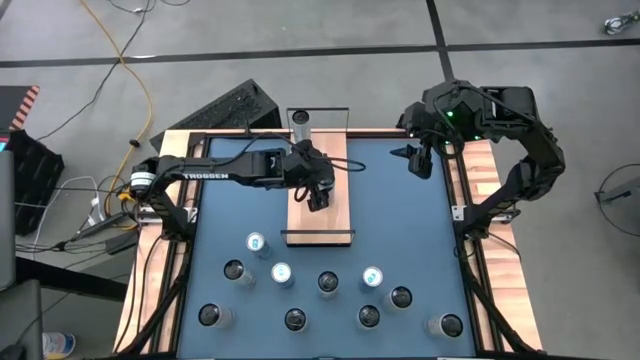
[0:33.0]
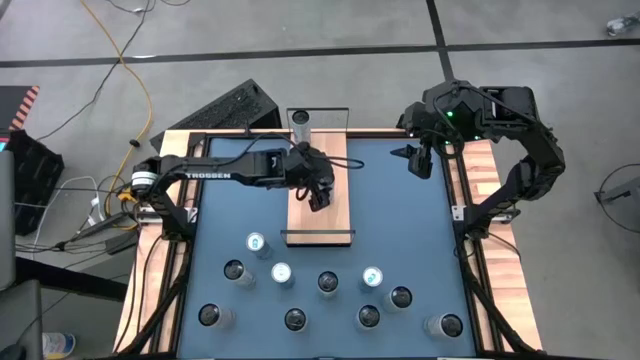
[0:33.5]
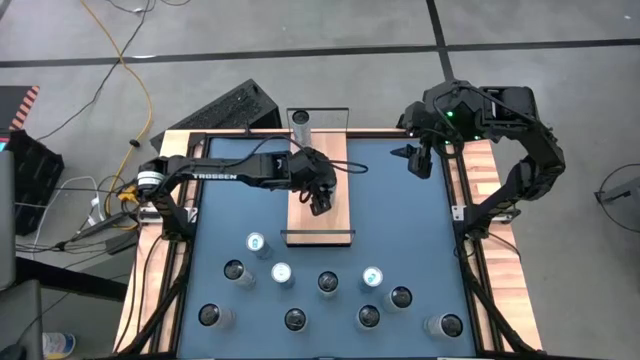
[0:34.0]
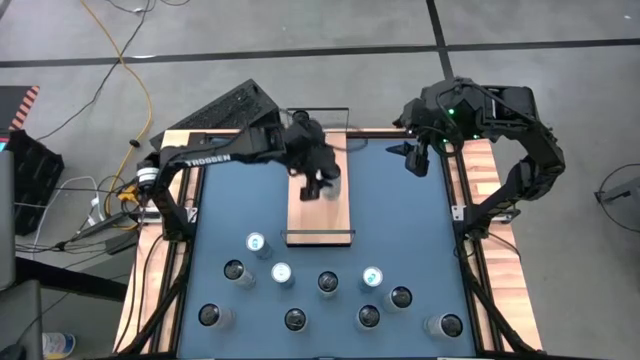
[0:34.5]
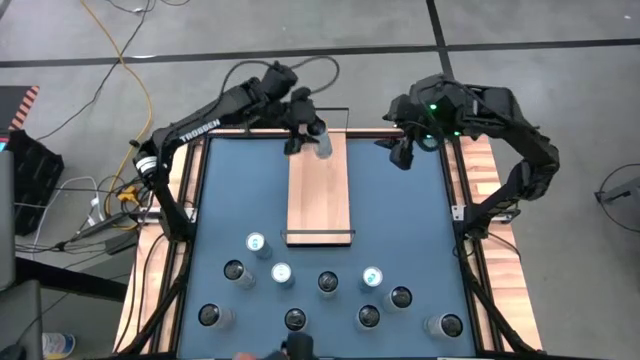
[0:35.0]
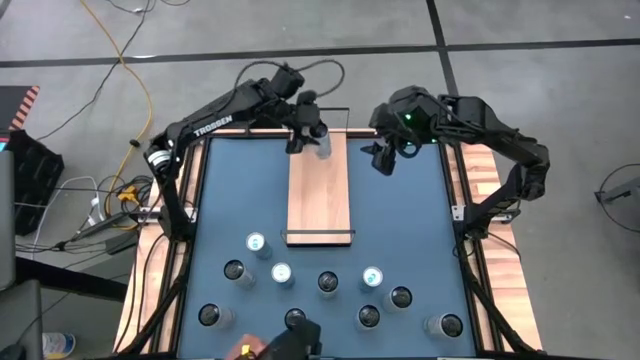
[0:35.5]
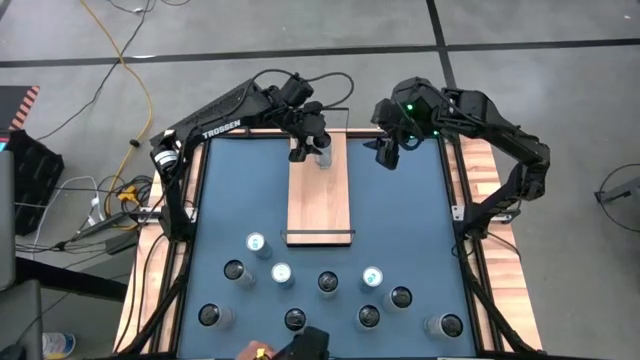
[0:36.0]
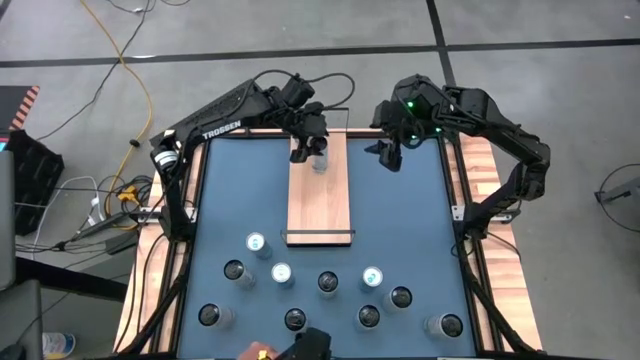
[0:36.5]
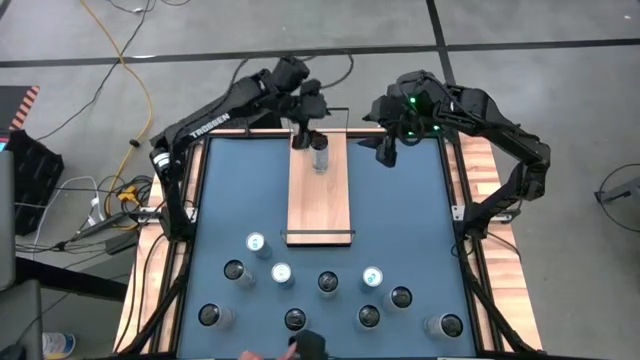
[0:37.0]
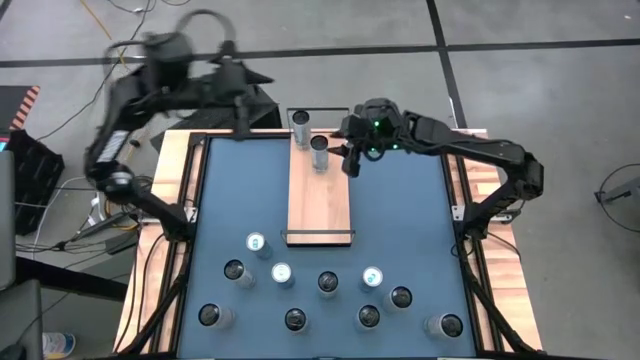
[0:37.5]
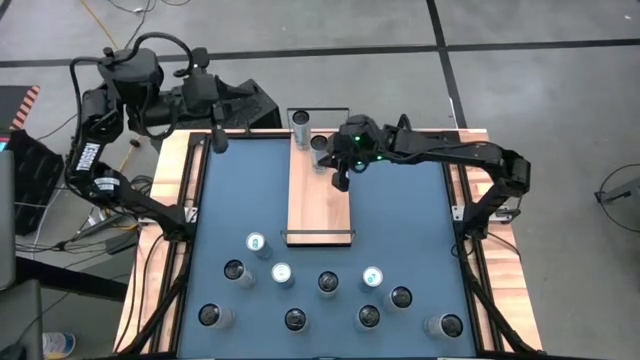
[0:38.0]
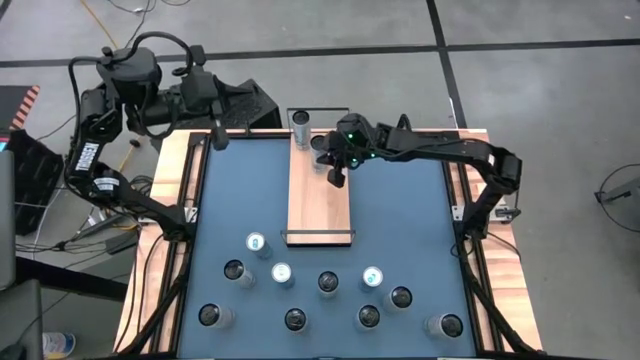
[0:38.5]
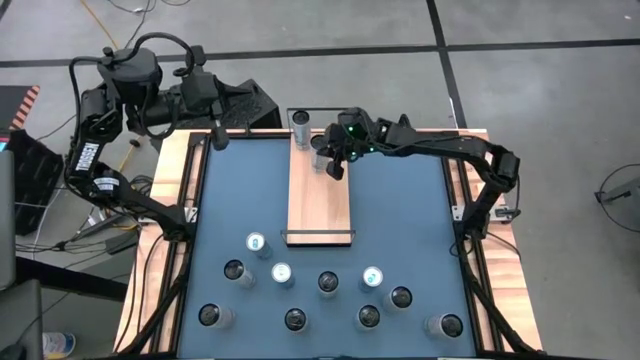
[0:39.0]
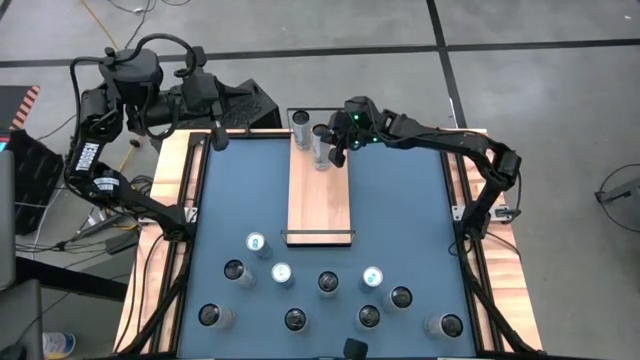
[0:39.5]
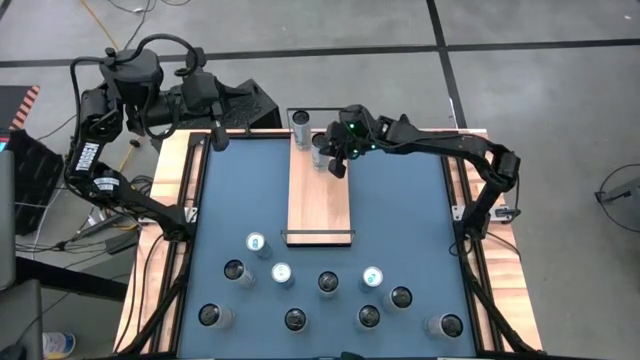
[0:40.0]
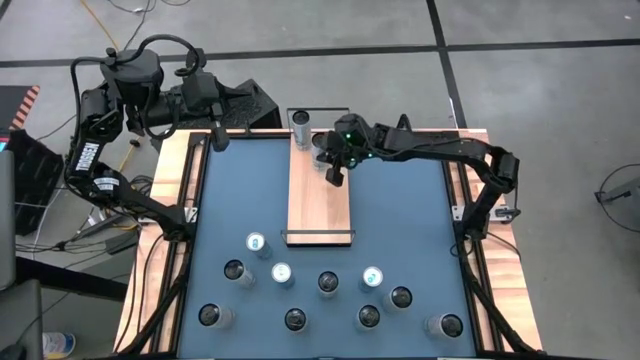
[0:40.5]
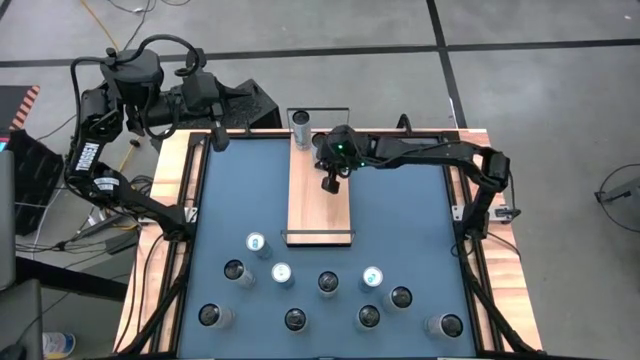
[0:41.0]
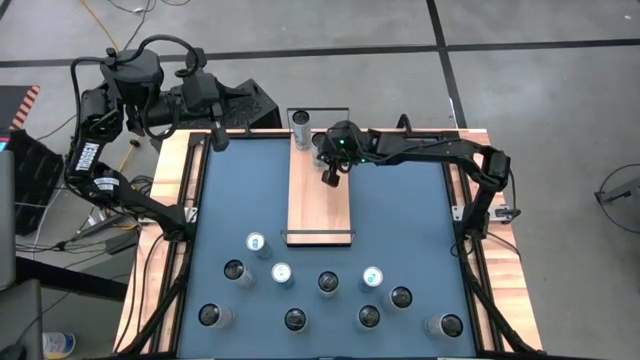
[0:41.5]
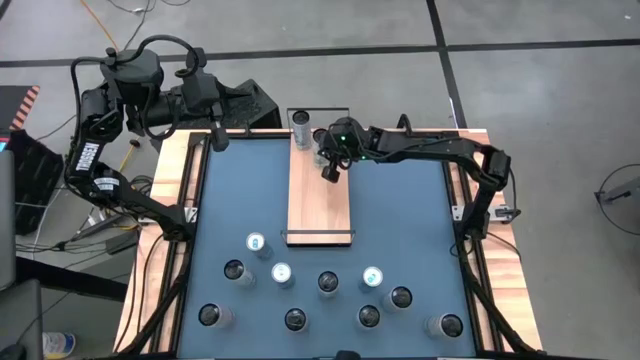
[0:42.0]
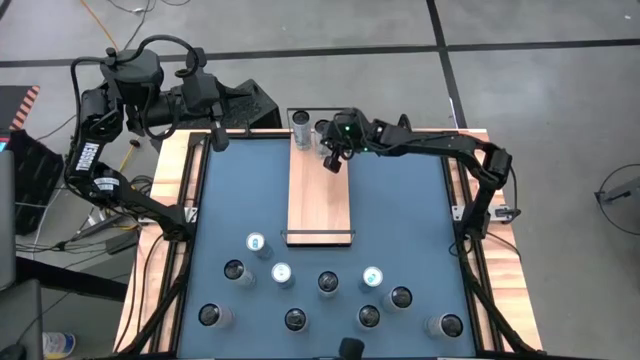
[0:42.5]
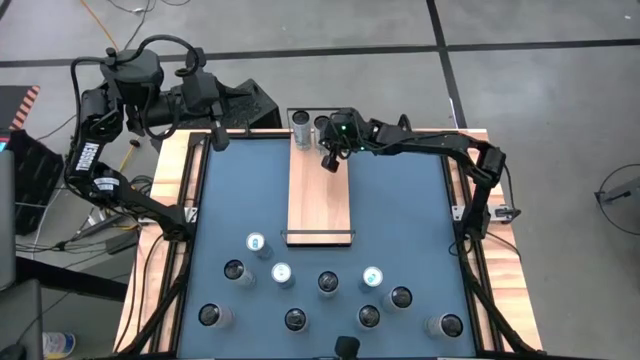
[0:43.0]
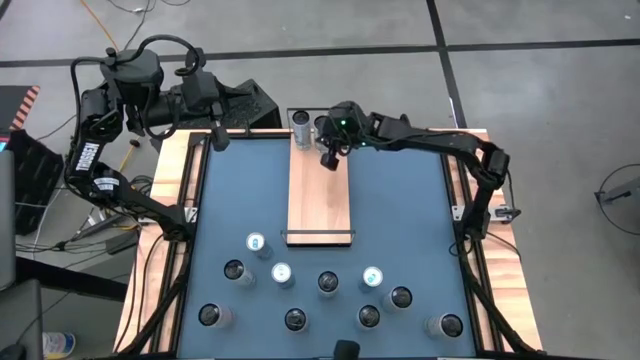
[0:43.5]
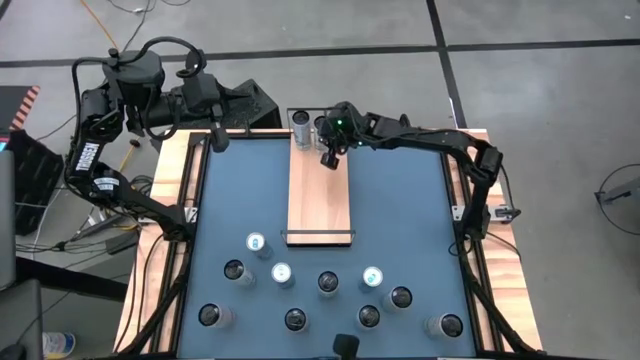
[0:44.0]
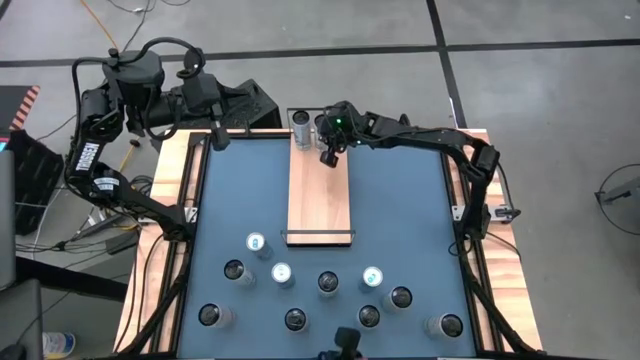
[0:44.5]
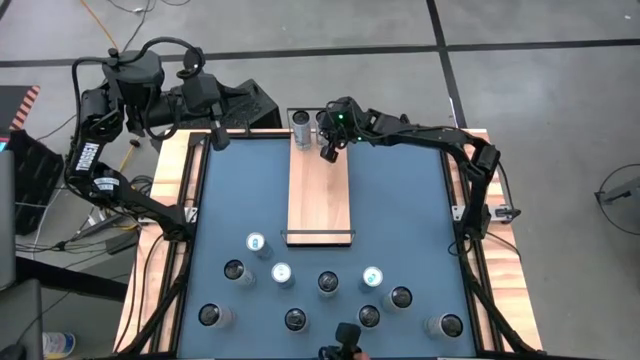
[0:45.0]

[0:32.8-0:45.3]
Task: Place canned beverage on shelf
Put the top white-blue soda can on the shelf

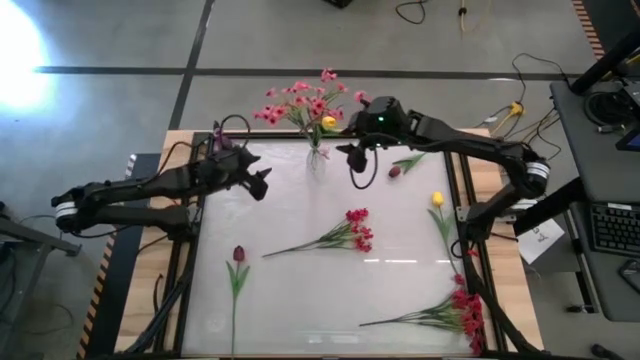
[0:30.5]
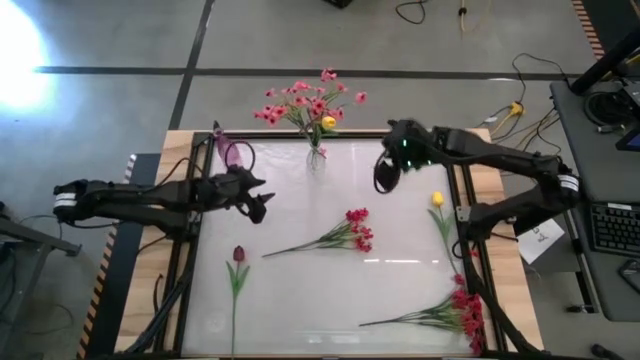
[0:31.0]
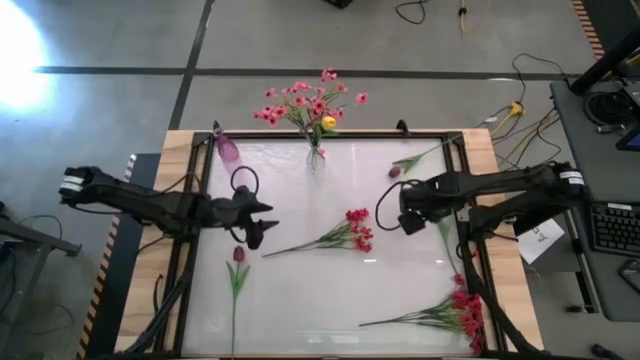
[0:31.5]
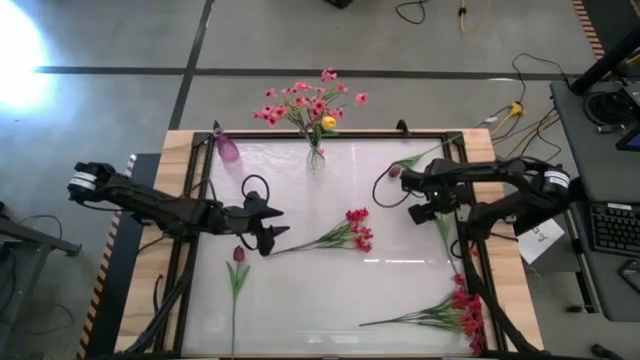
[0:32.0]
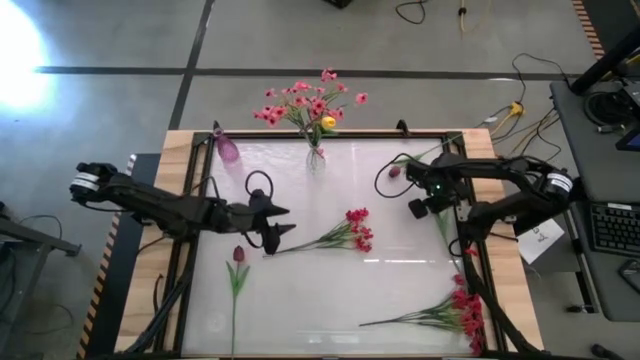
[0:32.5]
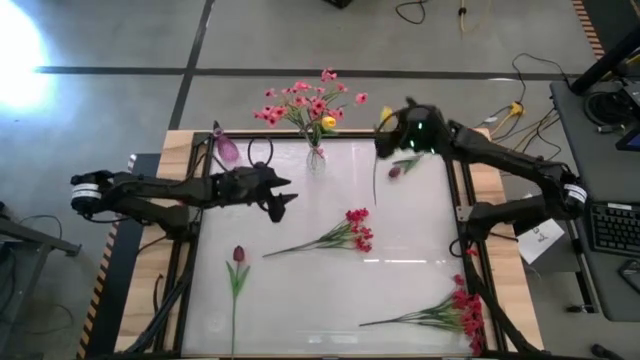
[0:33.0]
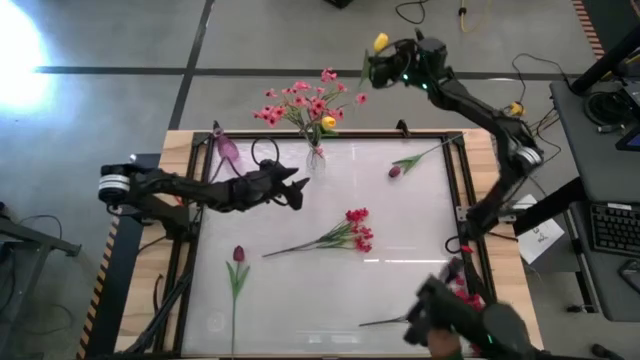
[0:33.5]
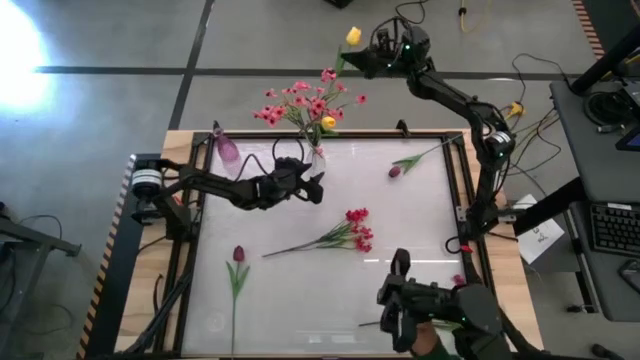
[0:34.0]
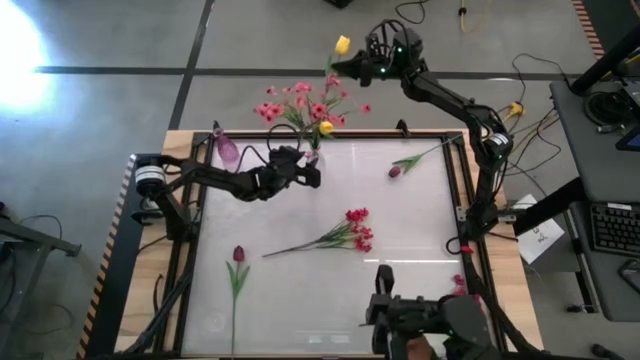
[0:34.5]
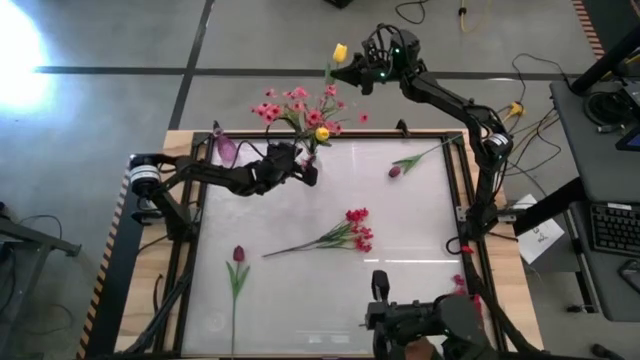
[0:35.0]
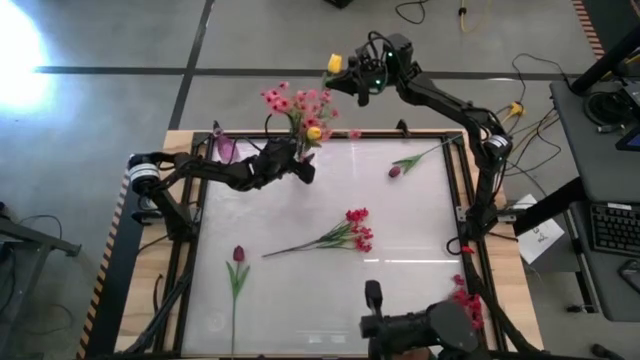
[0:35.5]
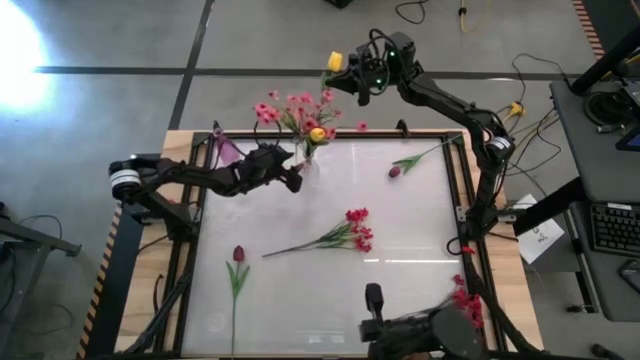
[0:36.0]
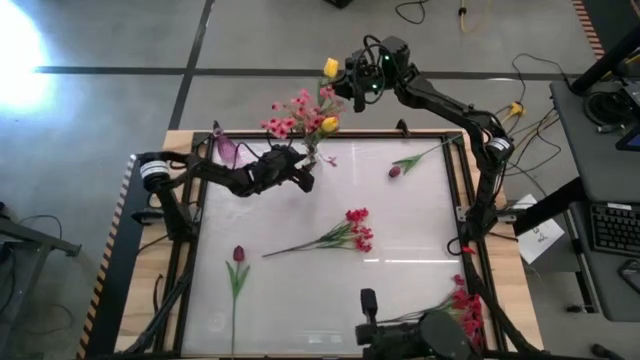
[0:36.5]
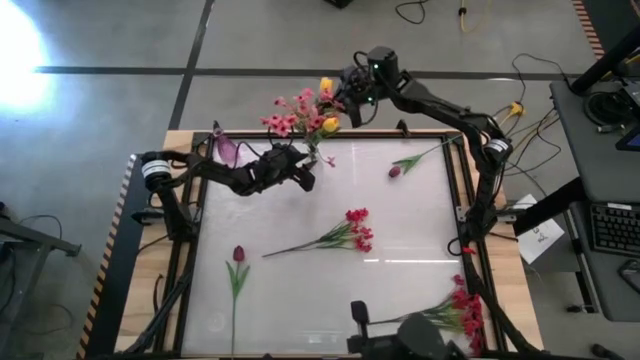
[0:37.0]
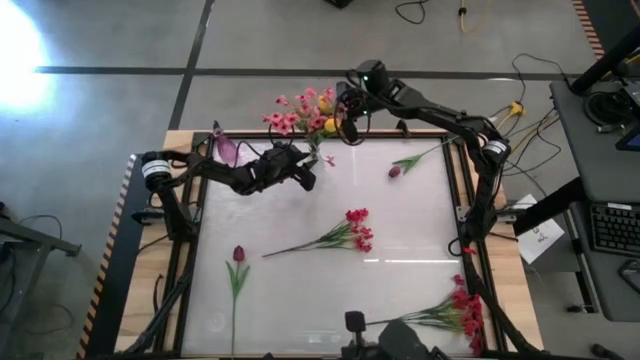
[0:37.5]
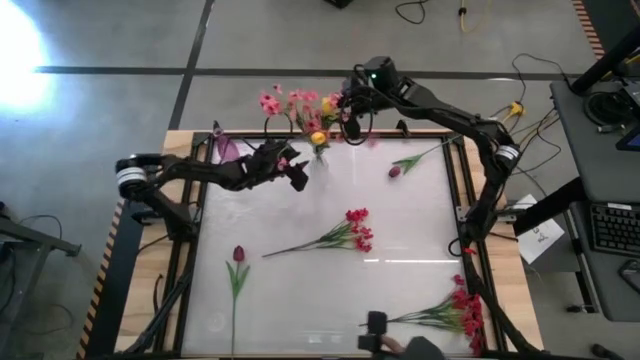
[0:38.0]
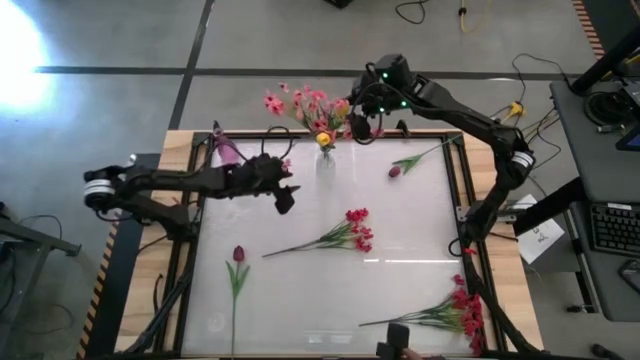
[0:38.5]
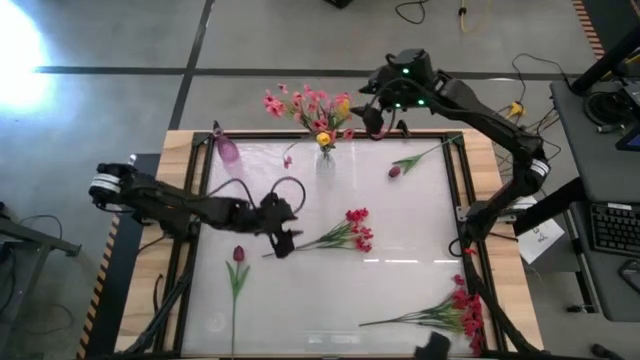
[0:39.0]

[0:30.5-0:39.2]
Task: Sort flowers into vase by color
Put the yellow tulip into the transparent vase
